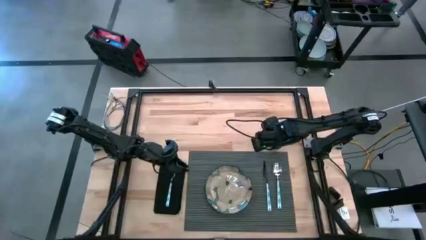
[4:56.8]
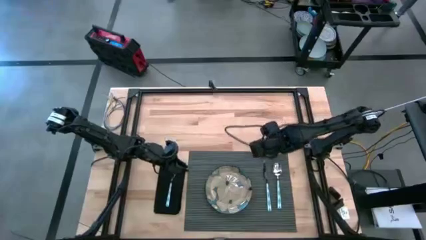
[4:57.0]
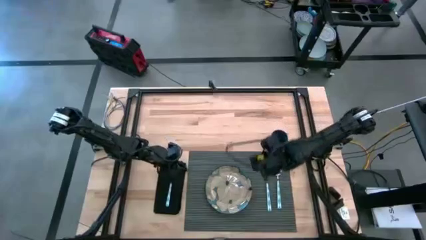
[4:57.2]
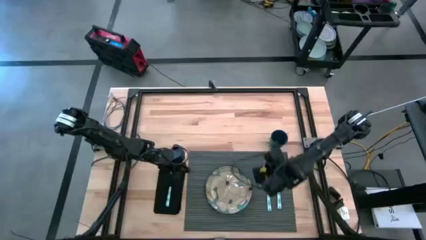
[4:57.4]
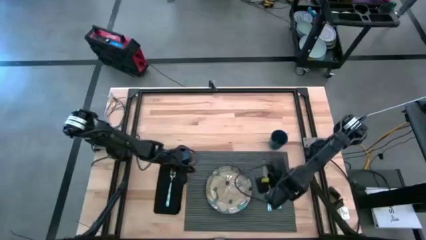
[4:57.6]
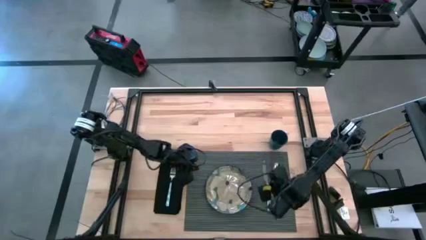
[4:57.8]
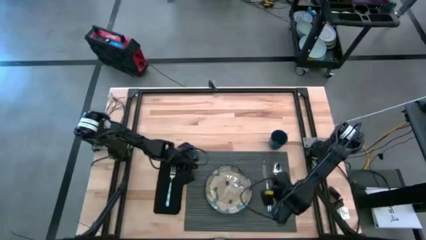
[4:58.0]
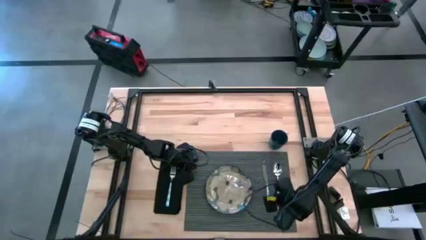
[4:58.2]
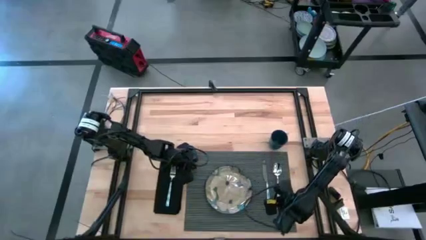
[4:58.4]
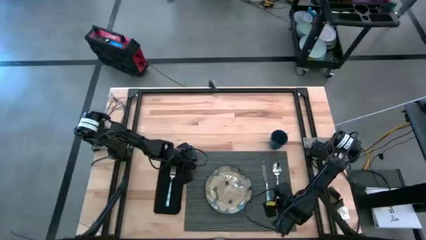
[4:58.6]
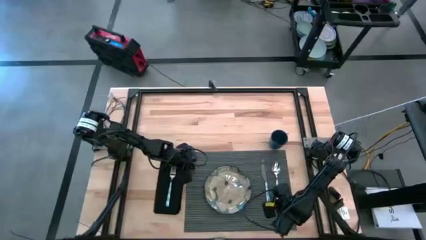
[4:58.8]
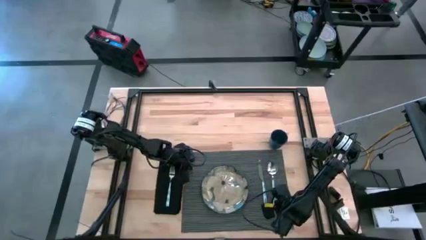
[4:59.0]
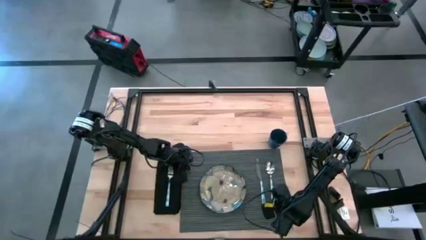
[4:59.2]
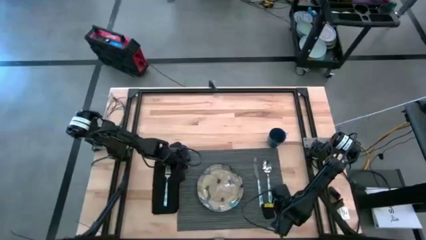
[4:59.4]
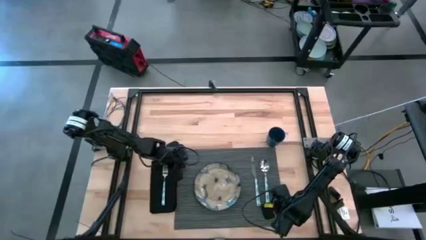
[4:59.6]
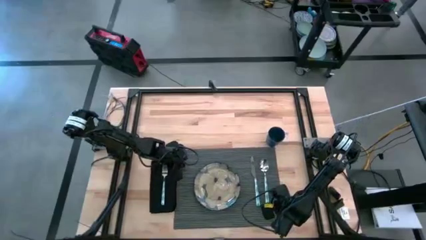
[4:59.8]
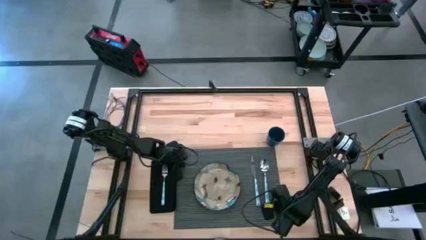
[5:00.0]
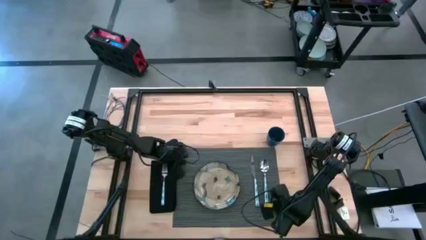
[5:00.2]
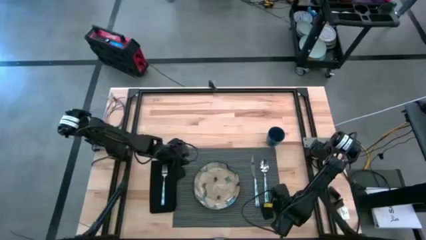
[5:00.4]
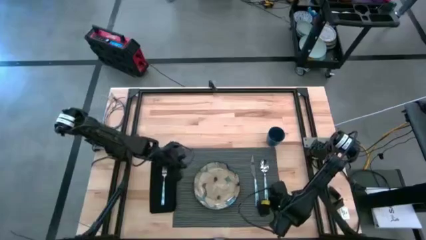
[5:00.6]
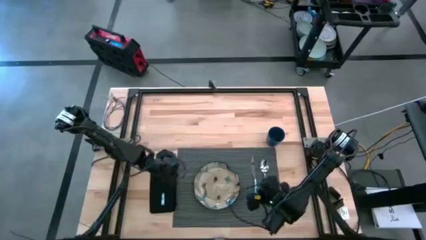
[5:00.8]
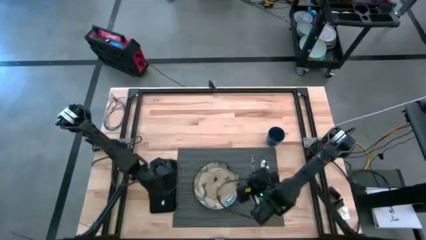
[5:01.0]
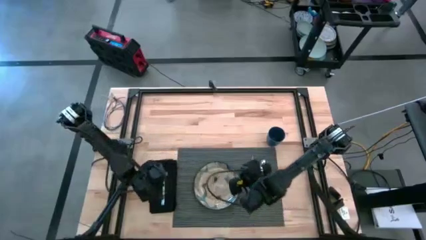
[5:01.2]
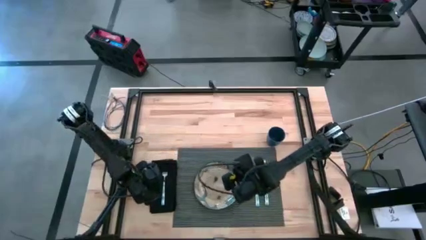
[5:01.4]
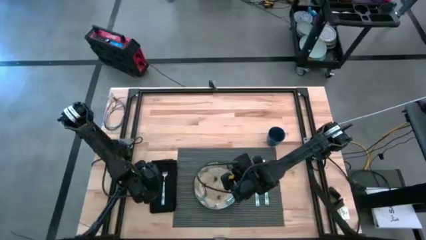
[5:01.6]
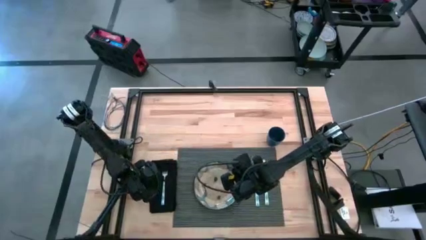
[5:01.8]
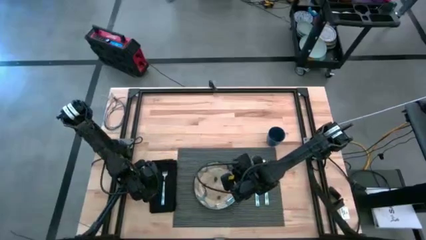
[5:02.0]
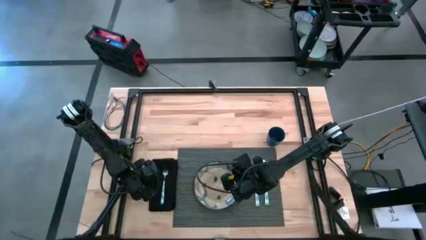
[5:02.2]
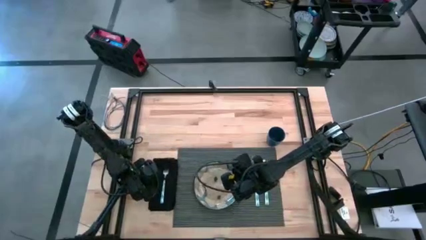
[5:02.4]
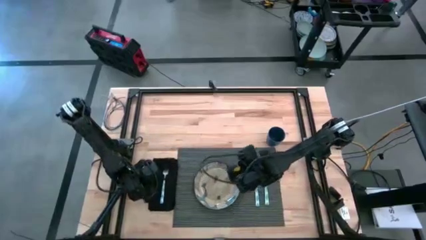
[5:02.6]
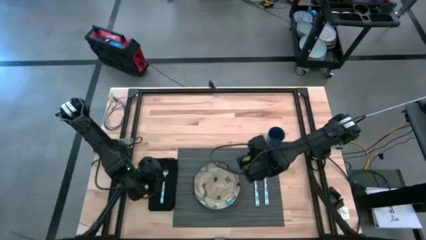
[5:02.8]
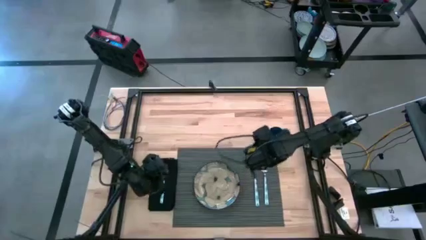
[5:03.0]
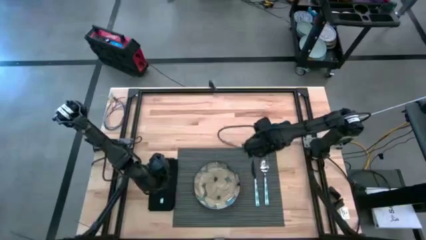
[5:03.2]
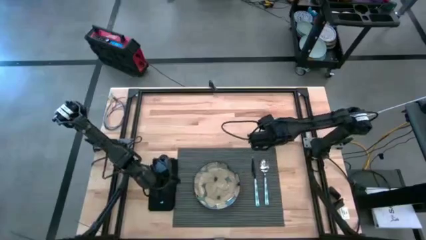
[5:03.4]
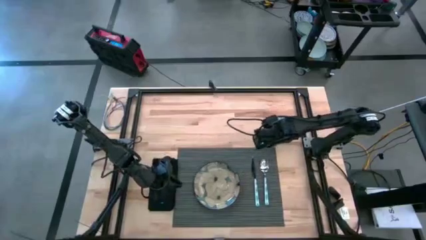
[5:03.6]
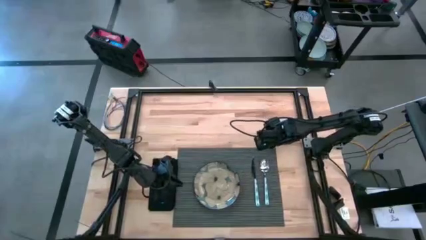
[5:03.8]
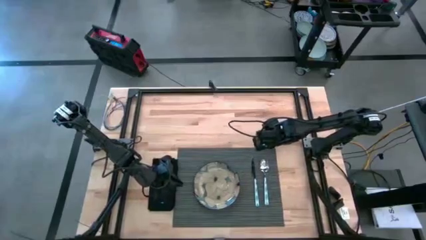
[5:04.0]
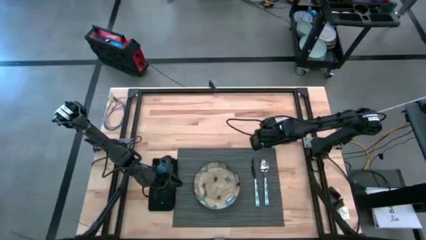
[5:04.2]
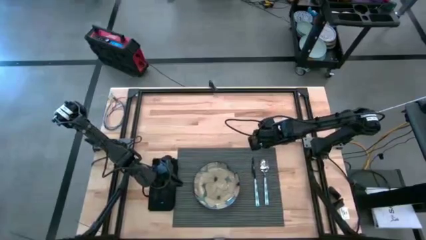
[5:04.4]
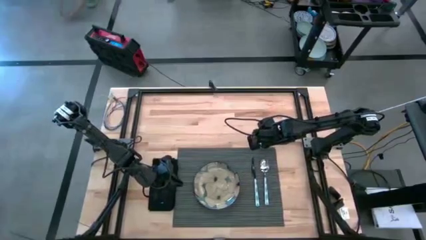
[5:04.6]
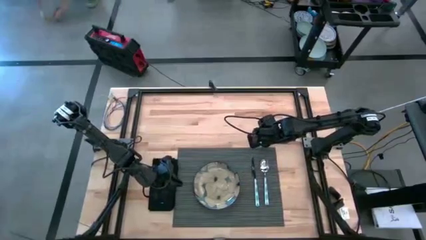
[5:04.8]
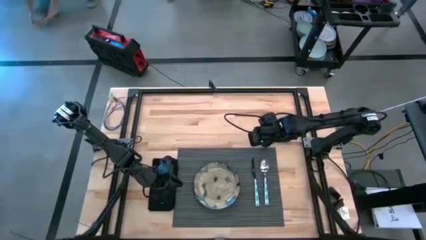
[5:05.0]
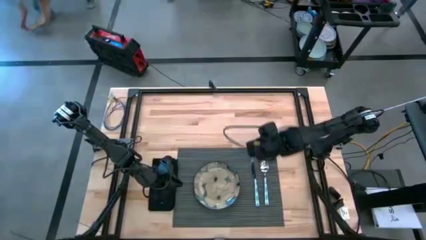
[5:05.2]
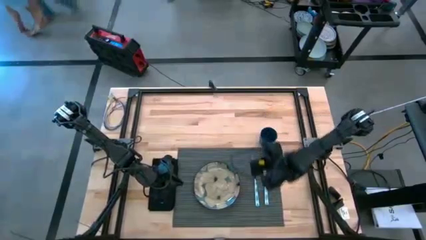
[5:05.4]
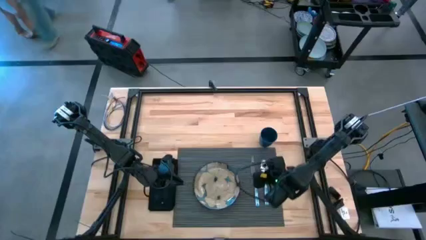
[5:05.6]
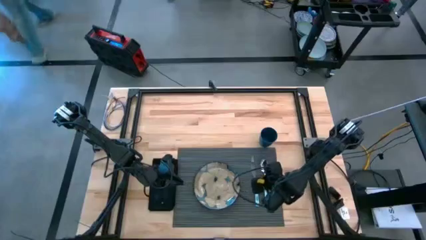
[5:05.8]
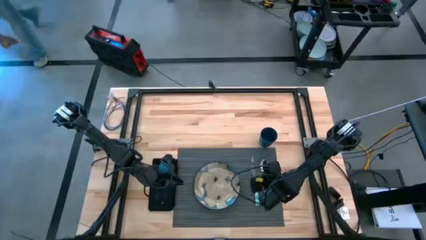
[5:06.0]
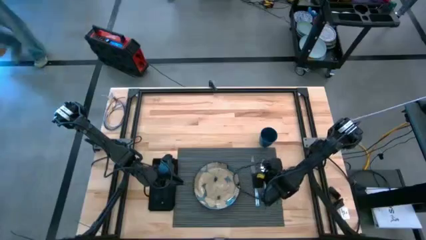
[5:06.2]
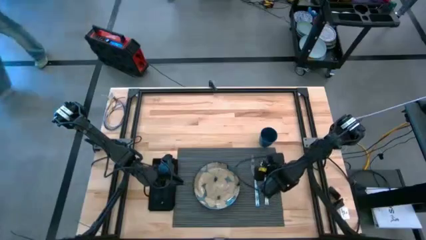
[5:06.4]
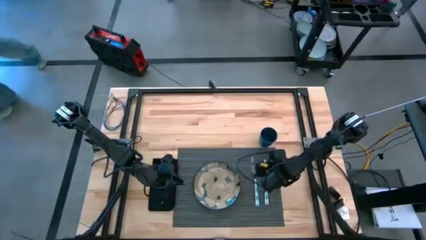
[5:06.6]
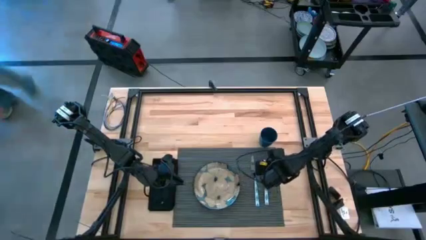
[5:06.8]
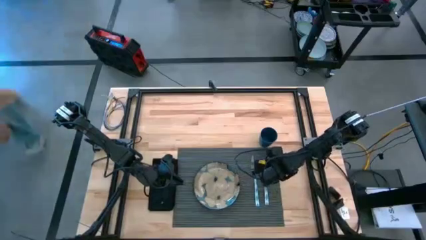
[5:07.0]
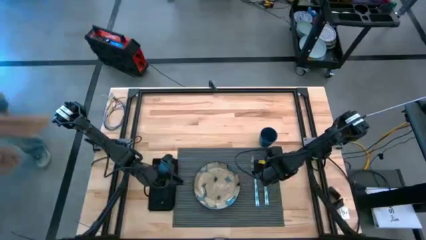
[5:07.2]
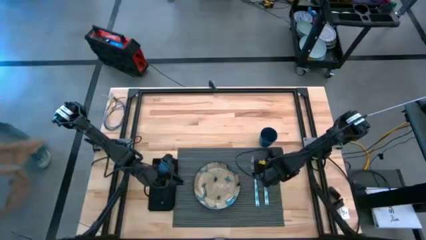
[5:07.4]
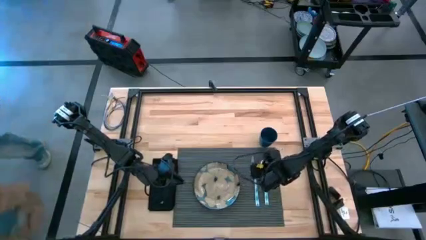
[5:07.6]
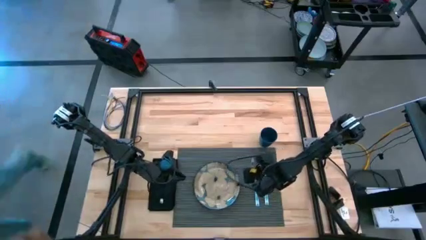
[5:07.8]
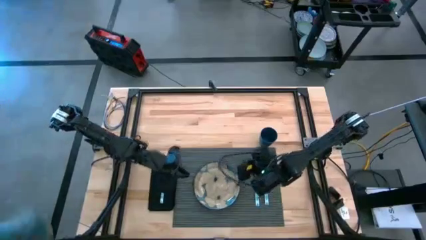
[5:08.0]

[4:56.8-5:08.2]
Task: Set table place
Adjust the gray mat and the utensils on the table

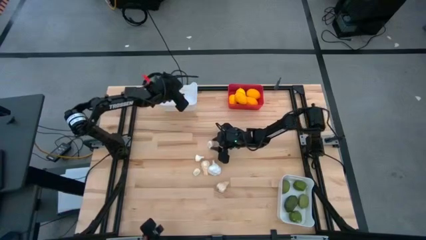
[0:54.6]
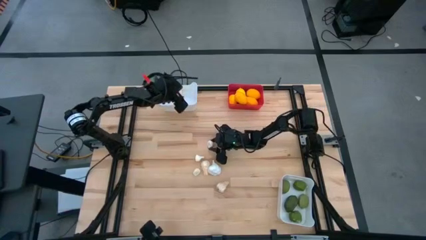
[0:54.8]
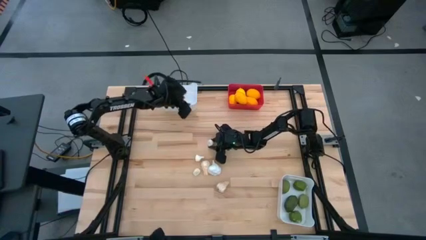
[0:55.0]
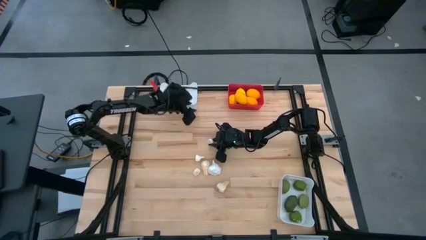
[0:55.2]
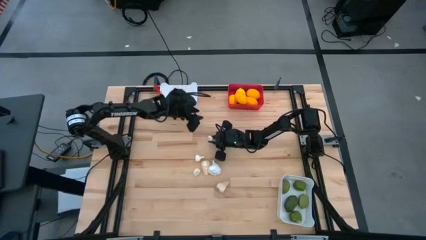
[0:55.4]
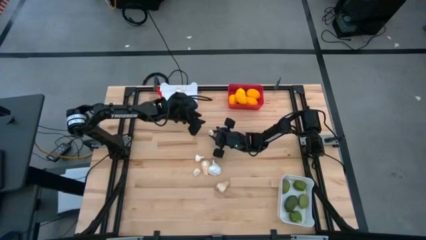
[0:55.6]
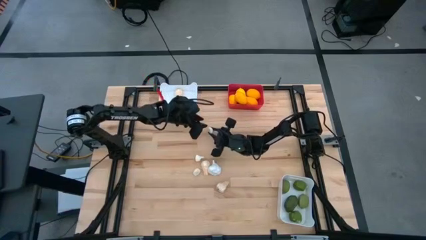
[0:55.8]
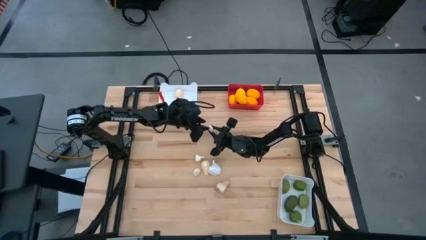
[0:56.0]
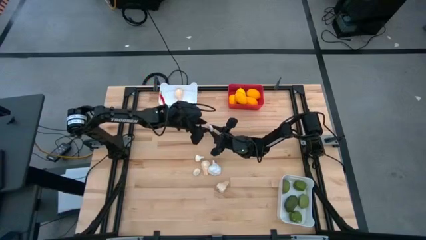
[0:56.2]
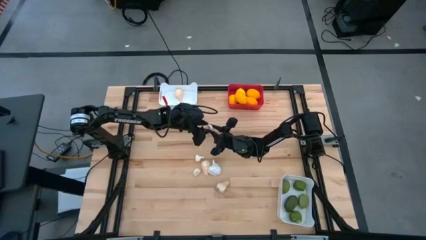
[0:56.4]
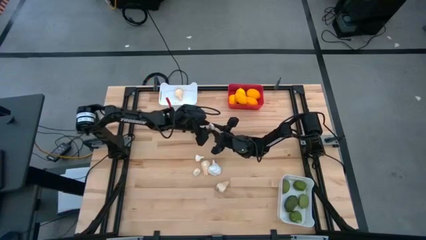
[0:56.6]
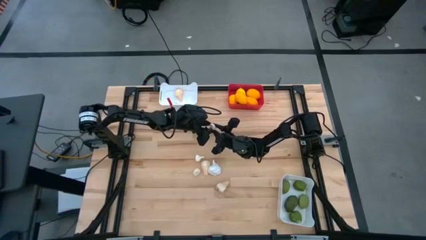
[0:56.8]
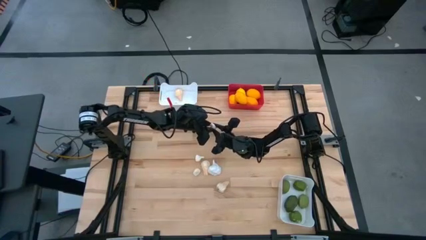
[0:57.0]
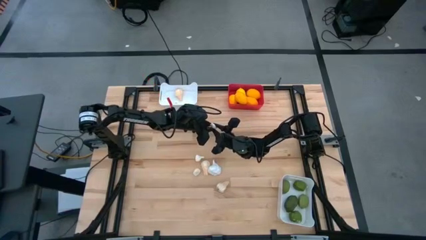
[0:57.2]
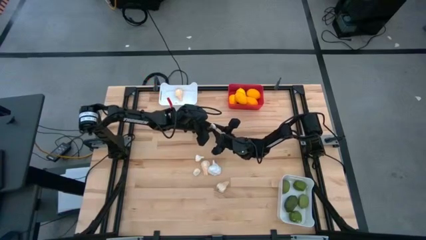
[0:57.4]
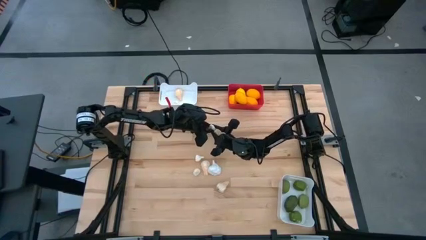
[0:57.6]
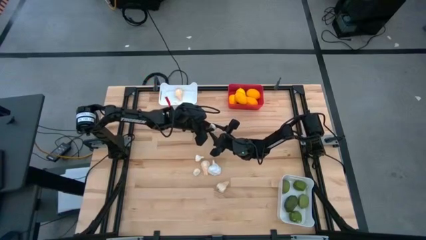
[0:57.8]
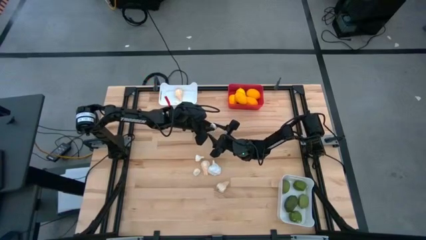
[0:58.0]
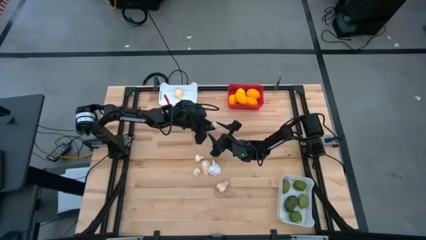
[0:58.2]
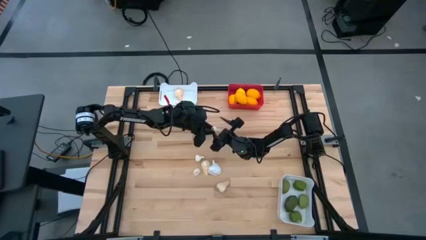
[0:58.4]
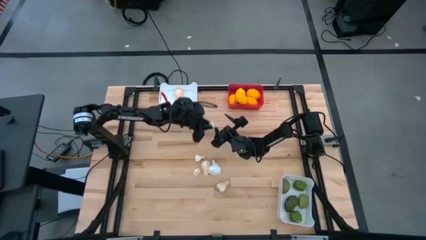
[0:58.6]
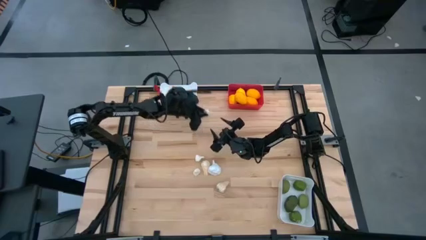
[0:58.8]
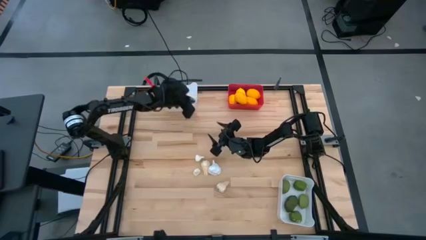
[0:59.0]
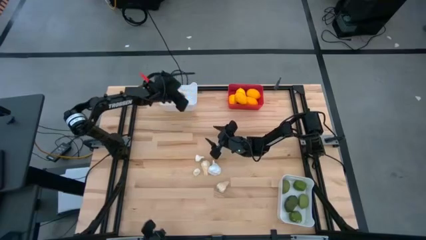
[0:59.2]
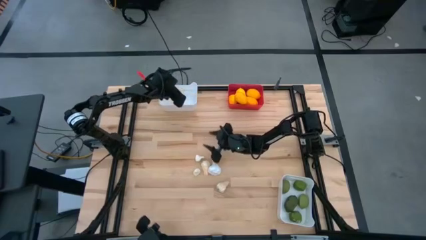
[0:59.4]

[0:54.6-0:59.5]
Task: Sort produce into baskets
Put the white garlic into the top white bin
